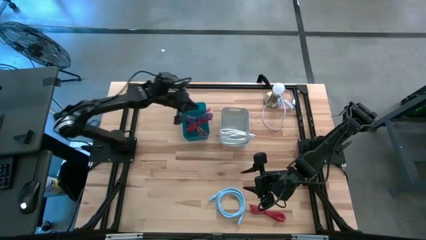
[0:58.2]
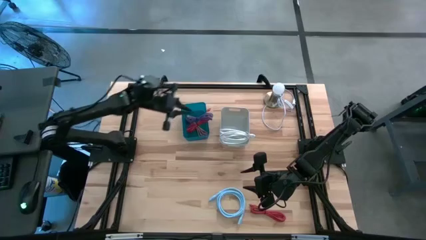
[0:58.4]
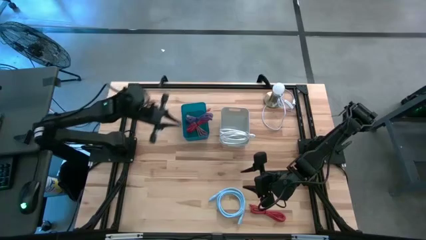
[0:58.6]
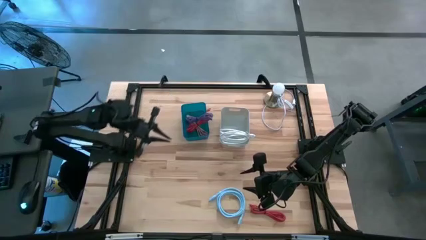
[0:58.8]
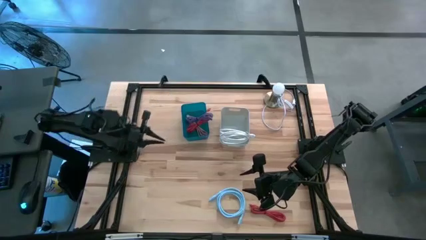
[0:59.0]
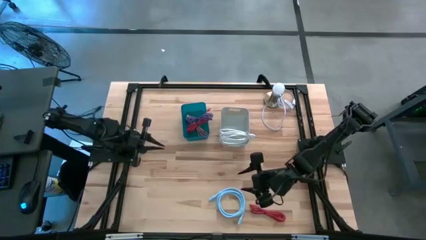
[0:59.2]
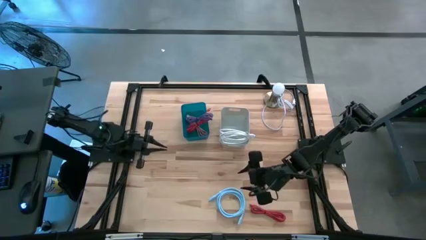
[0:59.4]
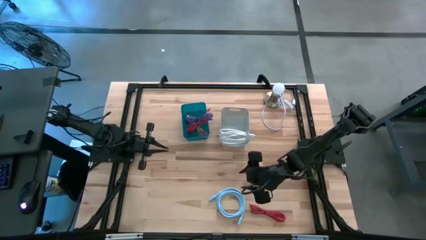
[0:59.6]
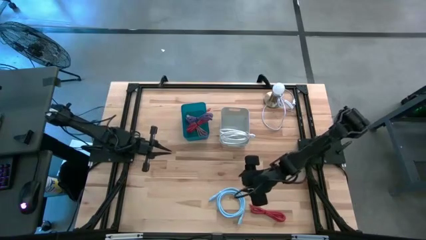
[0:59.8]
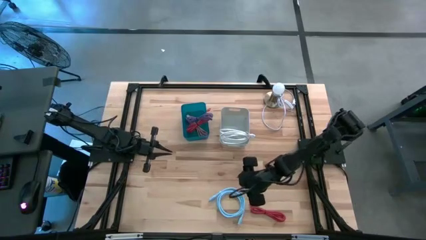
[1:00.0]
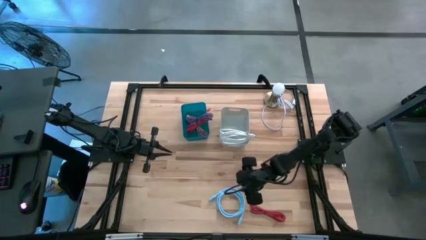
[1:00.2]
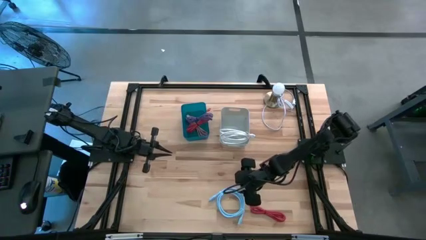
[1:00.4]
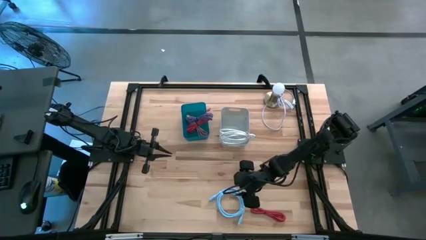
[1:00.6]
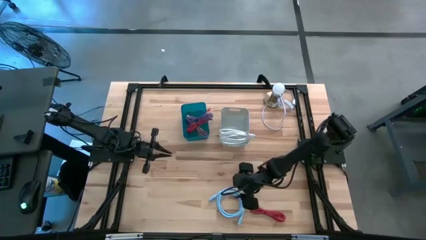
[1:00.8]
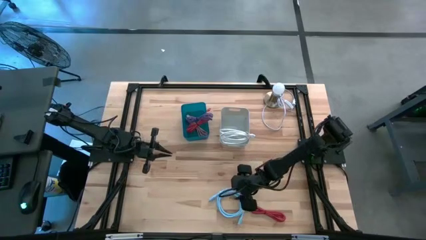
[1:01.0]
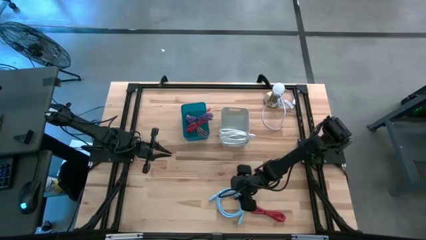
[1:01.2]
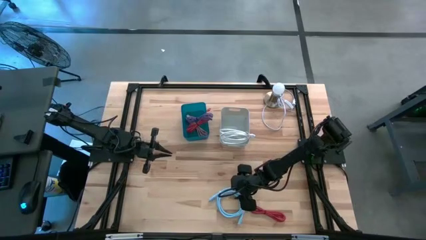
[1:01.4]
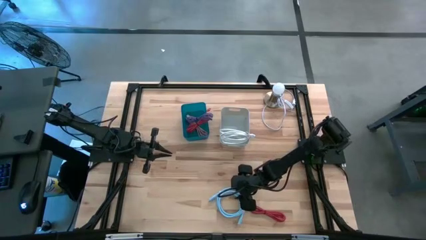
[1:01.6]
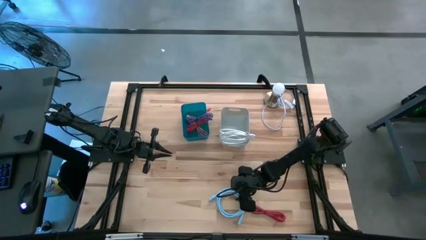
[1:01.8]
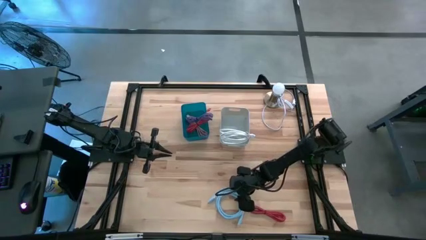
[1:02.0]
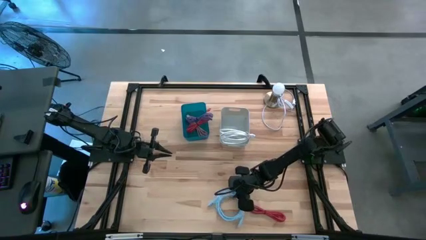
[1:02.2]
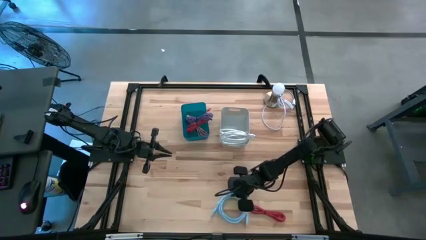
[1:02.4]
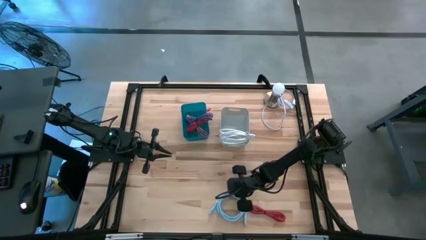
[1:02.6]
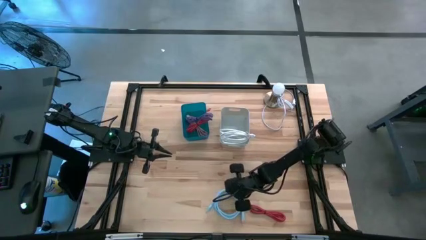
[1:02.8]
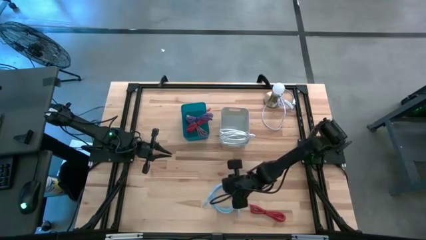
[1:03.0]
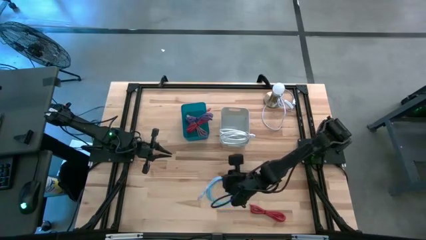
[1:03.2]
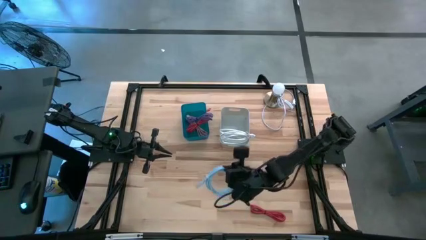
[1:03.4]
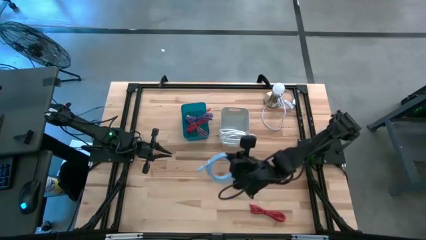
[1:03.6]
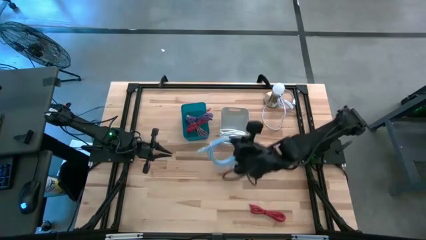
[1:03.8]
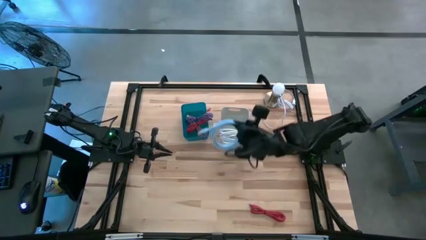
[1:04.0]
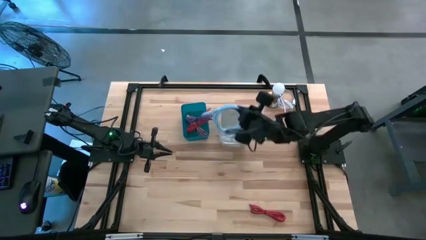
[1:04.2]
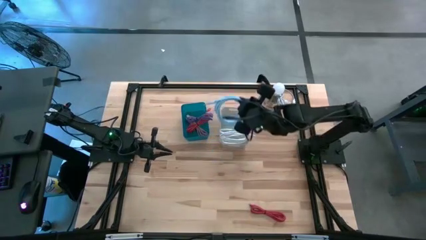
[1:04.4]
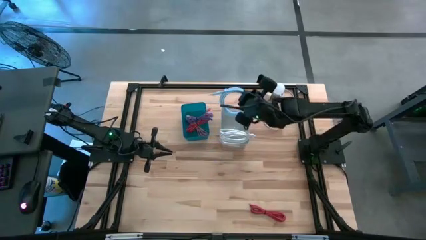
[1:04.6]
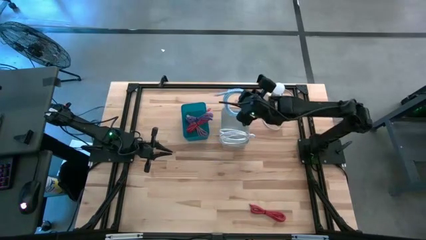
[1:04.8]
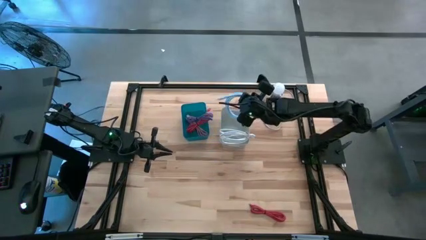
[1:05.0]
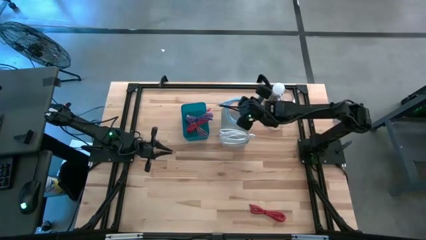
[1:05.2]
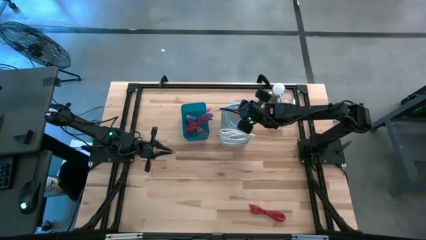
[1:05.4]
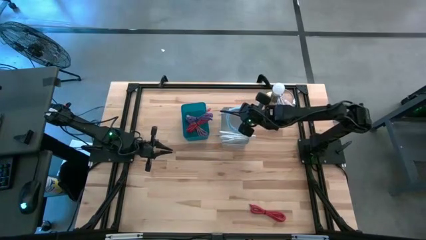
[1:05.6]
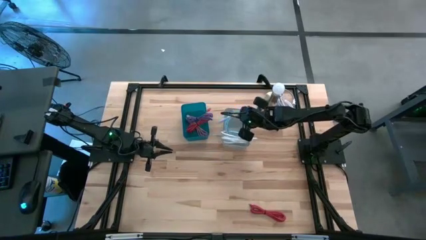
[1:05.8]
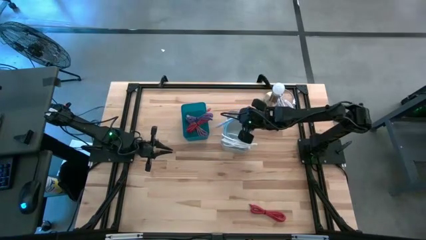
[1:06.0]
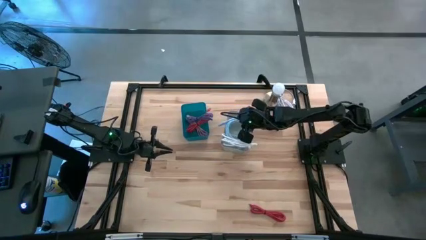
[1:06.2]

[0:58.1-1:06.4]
Task: Pick & Place USB Port
Put the blue HDMI cable into the gray bin

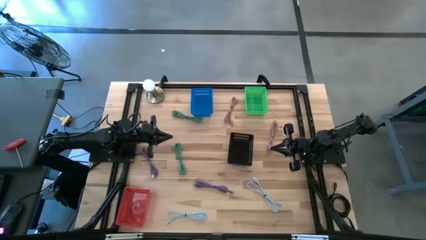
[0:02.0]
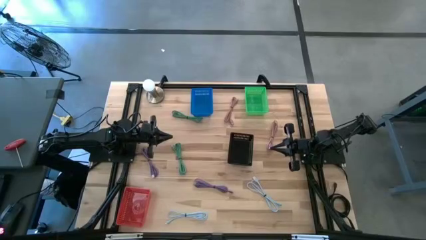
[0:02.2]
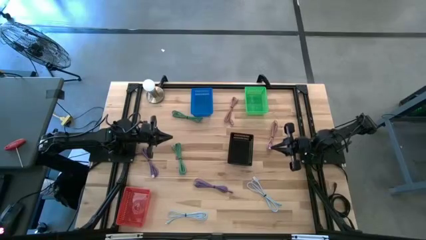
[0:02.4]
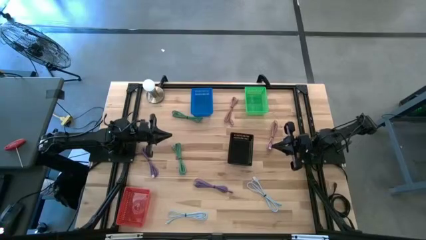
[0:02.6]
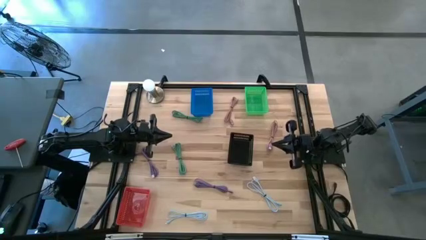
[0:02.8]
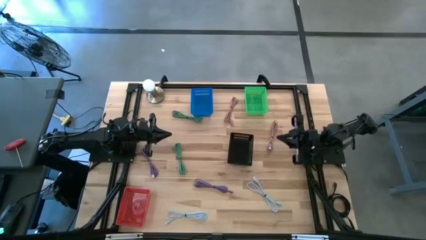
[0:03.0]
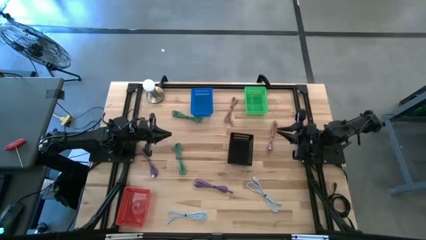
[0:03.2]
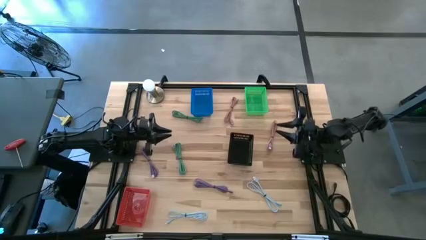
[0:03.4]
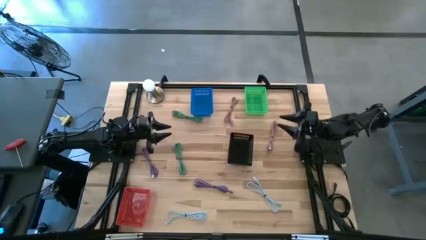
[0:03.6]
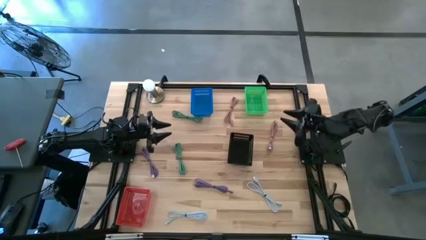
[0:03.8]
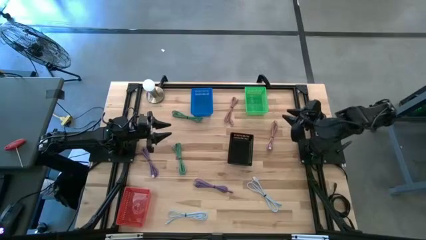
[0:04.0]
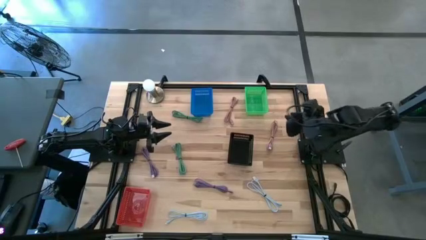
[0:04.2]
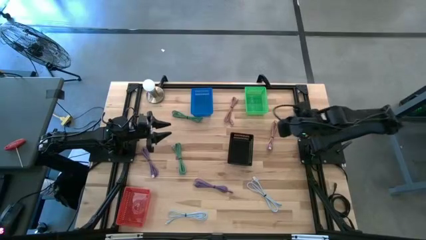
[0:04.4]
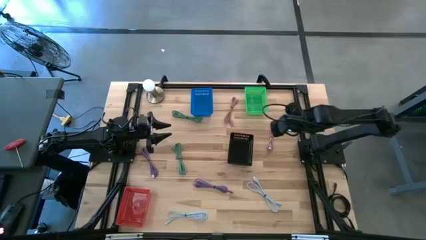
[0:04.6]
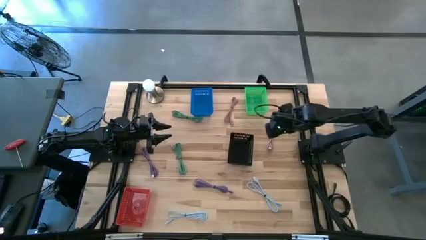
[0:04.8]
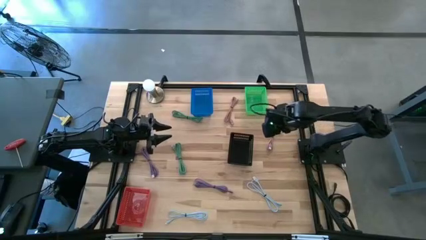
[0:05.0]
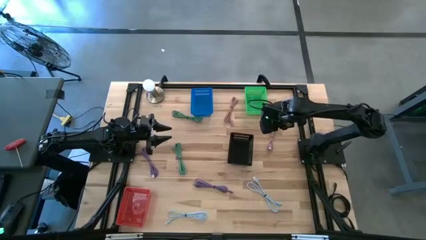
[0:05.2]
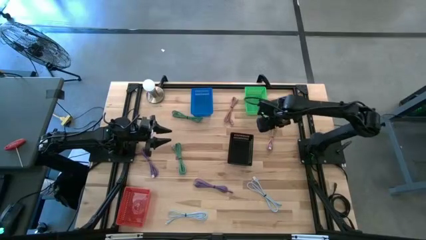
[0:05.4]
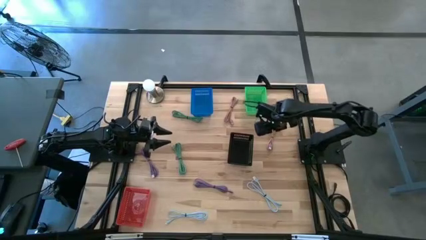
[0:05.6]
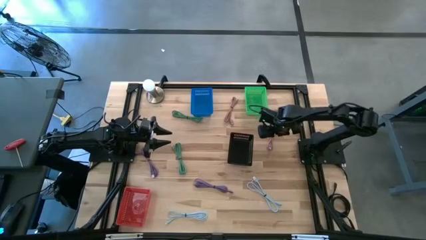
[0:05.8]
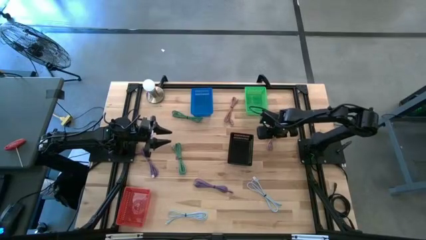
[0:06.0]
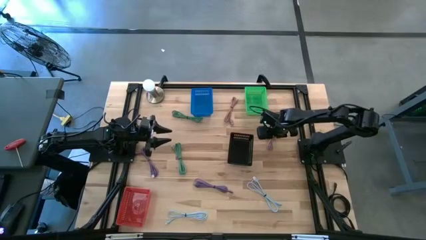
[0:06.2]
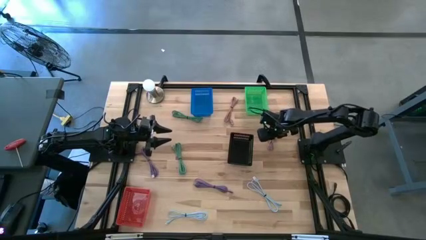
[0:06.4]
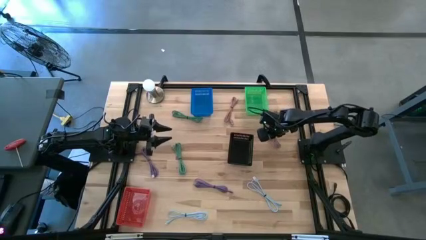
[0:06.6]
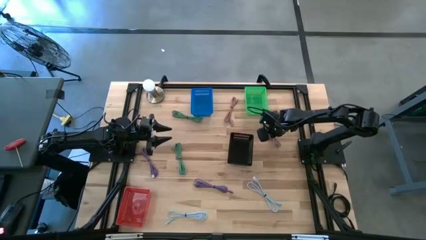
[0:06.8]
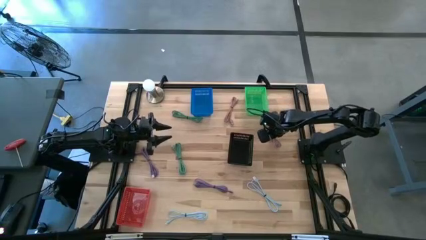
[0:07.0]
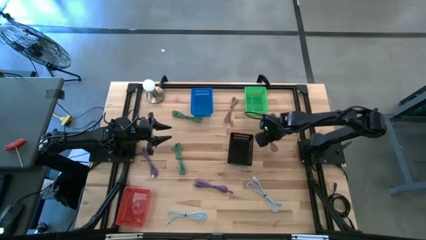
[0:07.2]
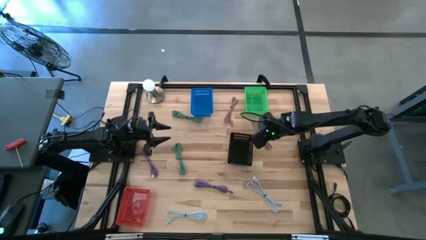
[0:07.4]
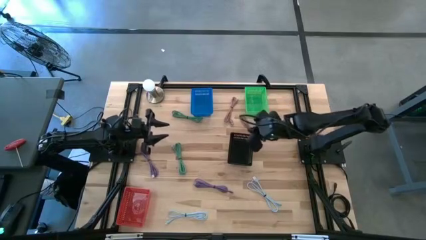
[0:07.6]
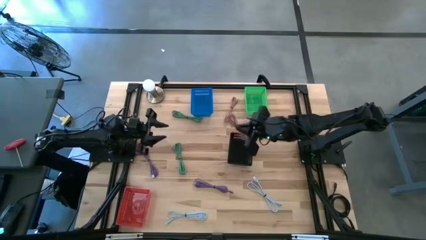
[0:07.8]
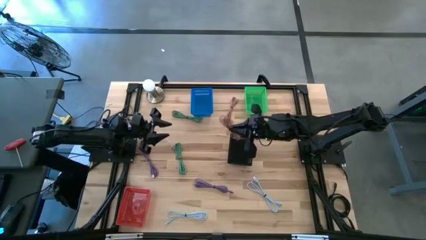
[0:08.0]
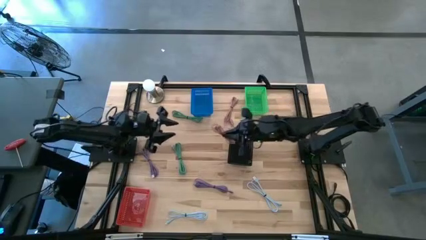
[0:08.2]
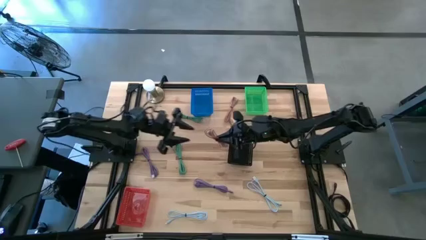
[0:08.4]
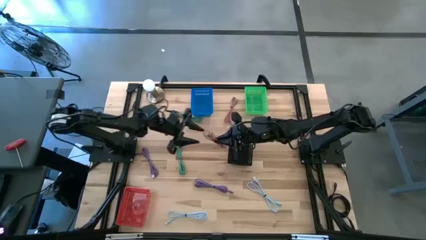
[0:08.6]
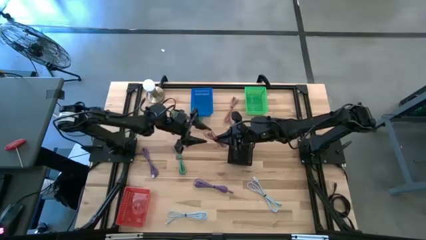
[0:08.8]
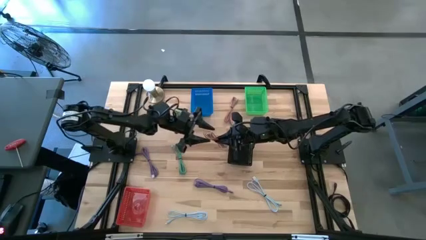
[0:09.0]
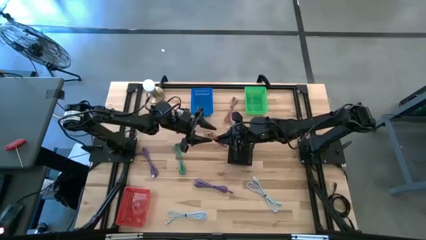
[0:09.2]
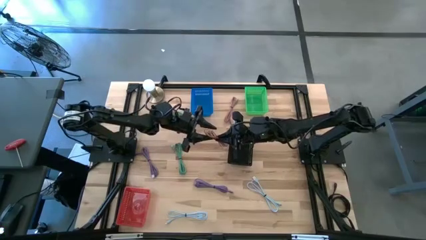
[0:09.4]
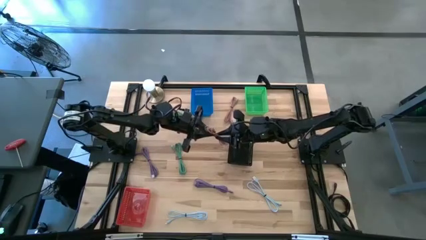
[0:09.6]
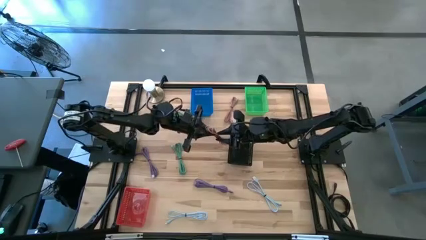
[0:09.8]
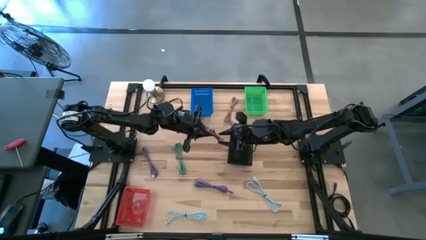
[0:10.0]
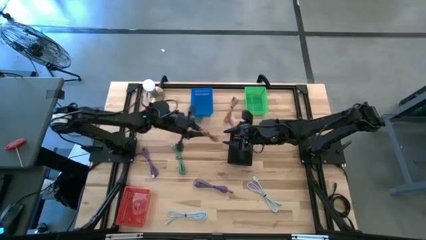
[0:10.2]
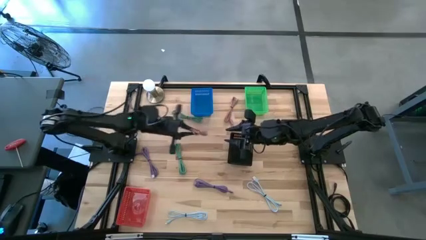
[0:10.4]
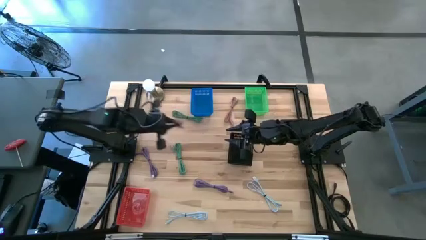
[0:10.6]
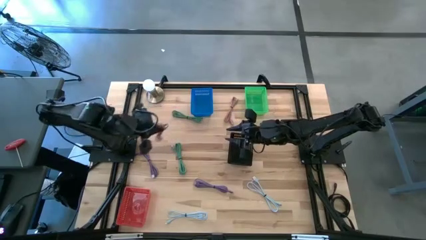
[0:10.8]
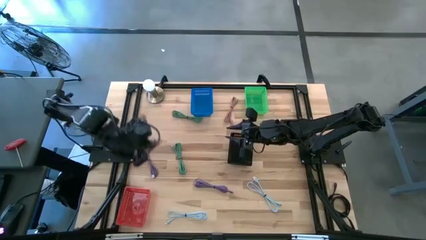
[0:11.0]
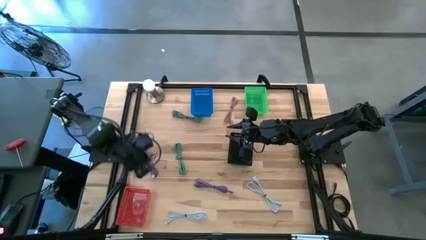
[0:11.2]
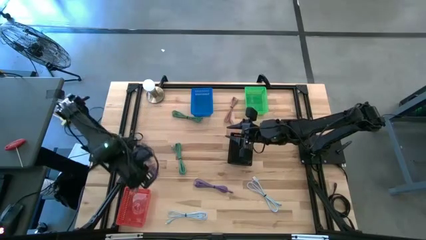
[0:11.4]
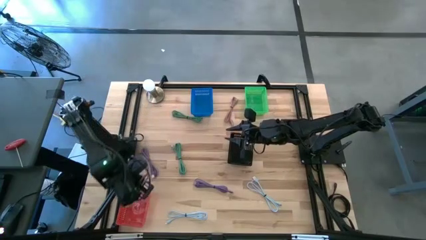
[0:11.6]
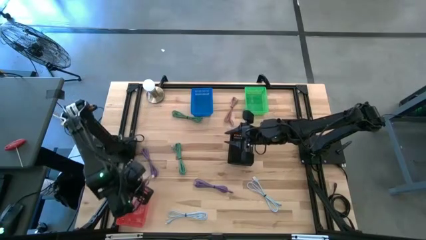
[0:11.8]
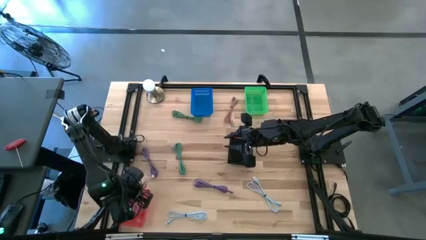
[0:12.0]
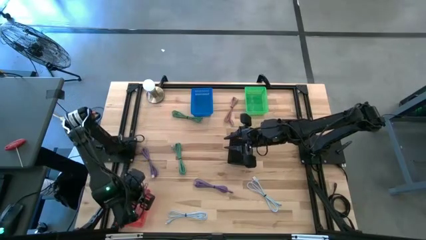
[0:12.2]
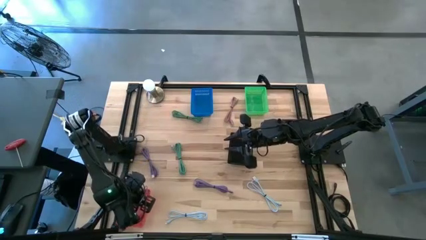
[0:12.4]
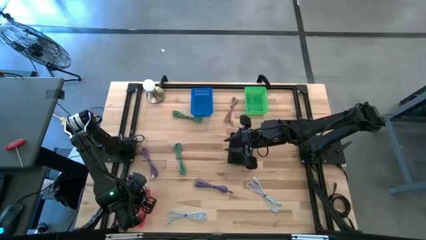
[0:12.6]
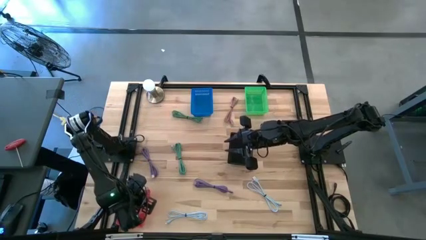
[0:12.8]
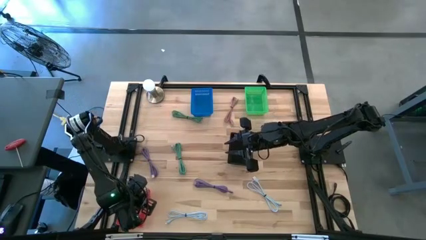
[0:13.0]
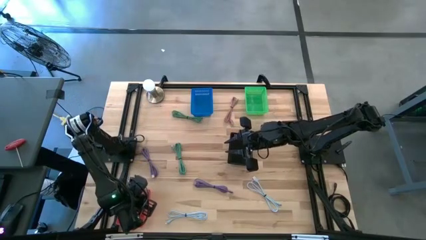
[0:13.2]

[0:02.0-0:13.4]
Task: Pick & Place USB Port
Put the right pink charger cable into the red bin
